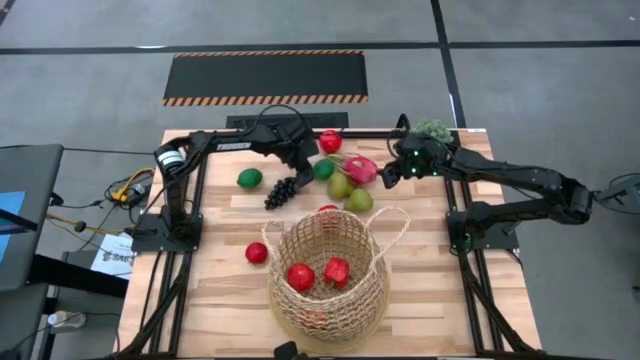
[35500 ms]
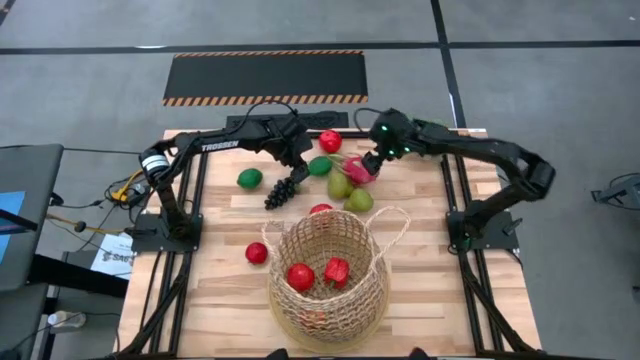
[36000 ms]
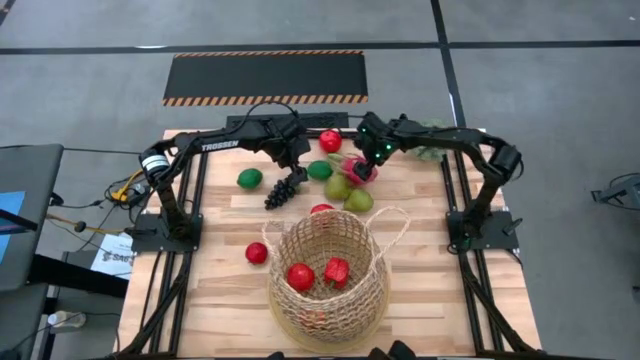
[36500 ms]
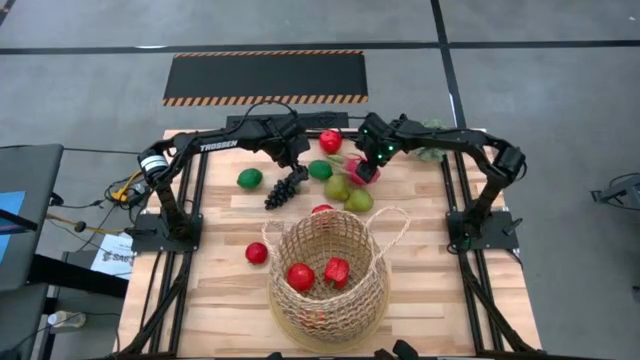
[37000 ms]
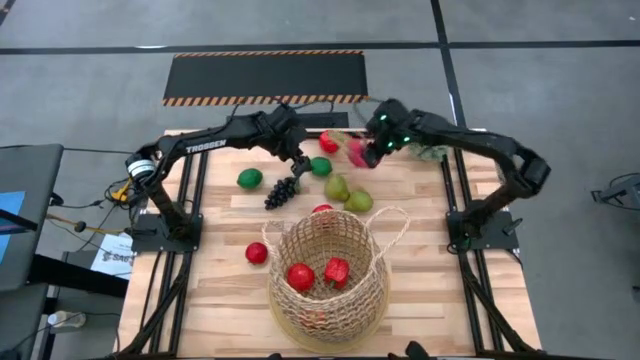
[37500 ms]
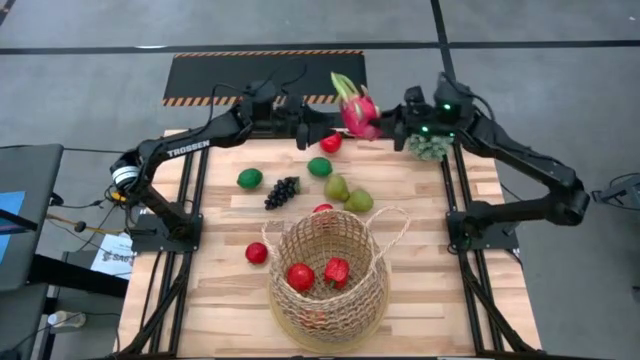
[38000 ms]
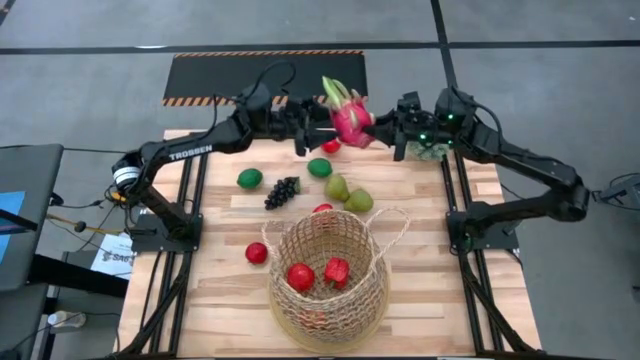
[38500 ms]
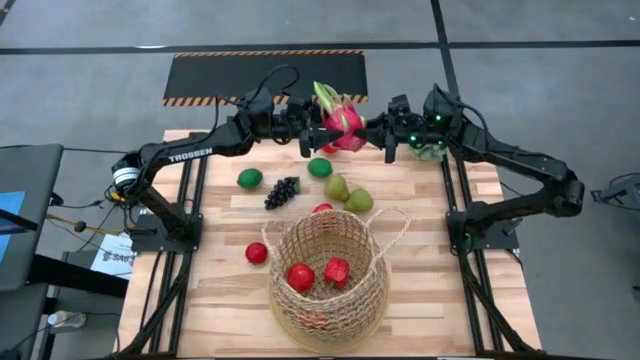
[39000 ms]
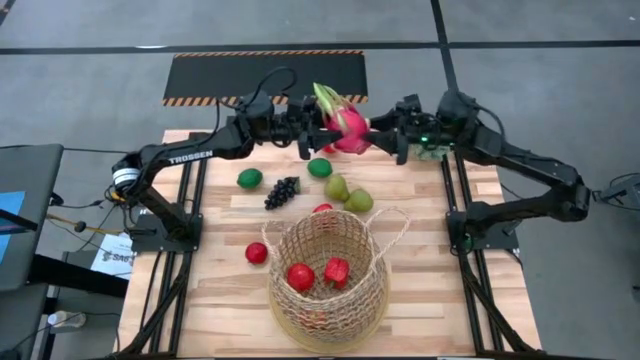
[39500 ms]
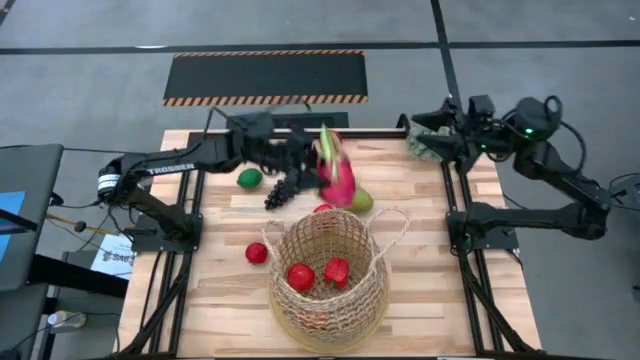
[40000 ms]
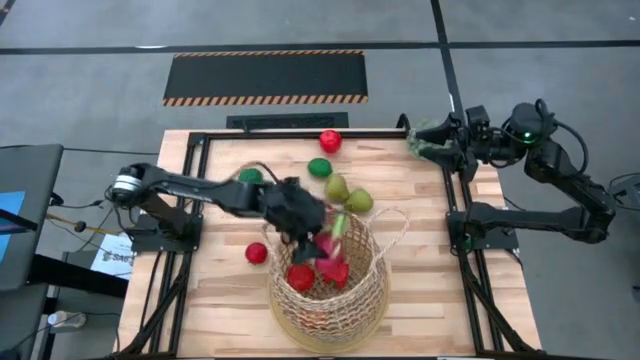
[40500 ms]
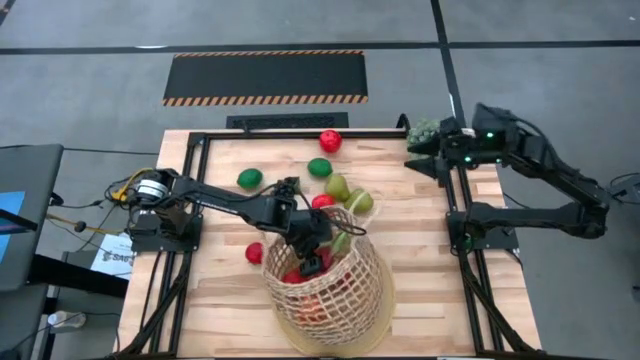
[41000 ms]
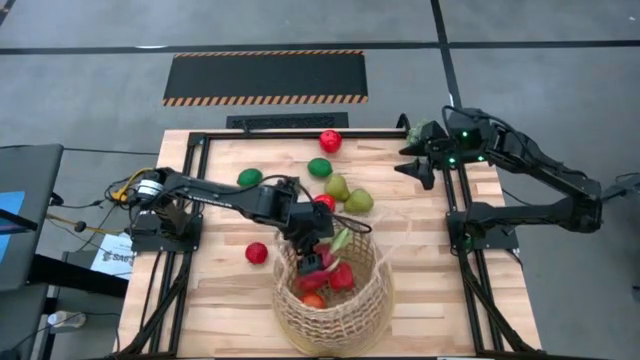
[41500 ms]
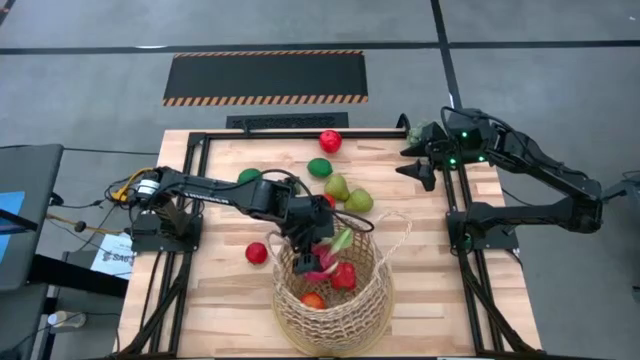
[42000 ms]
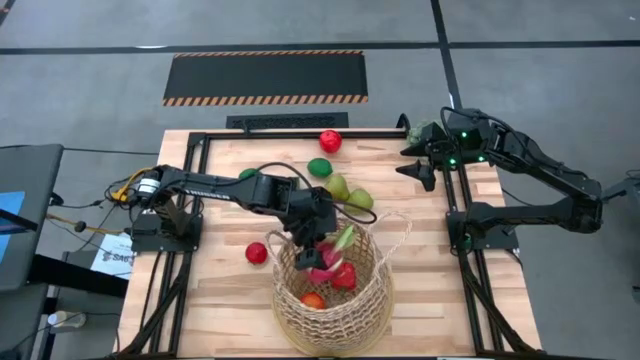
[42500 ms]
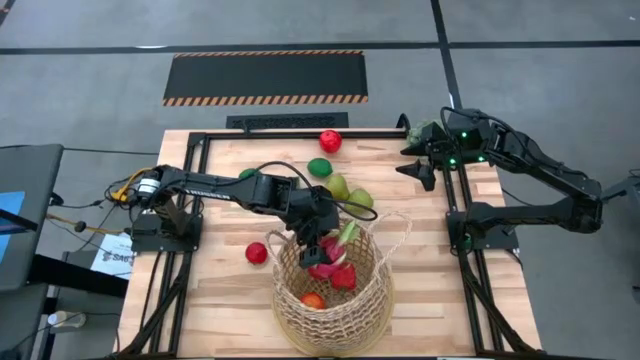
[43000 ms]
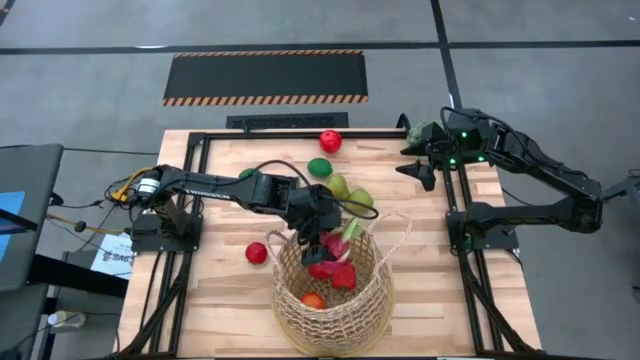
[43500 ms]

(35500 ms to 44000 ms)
Task: Build produce basket
Put the dragon fruit into the basket

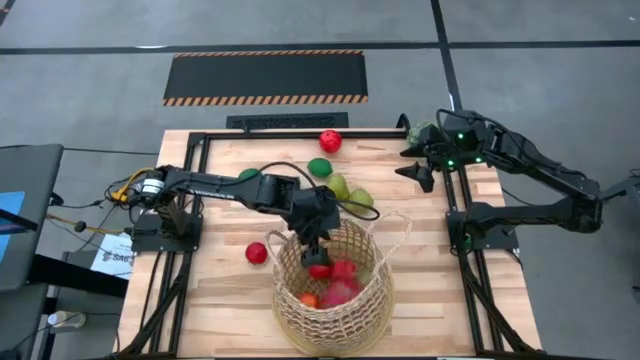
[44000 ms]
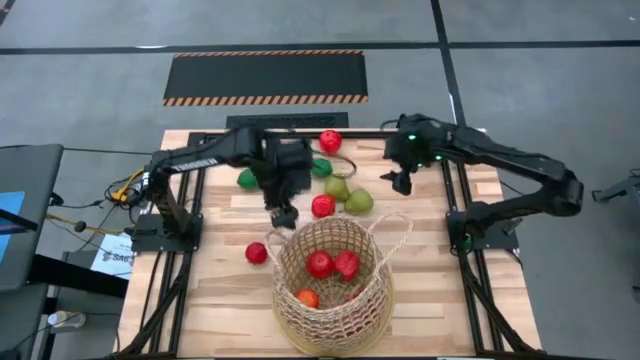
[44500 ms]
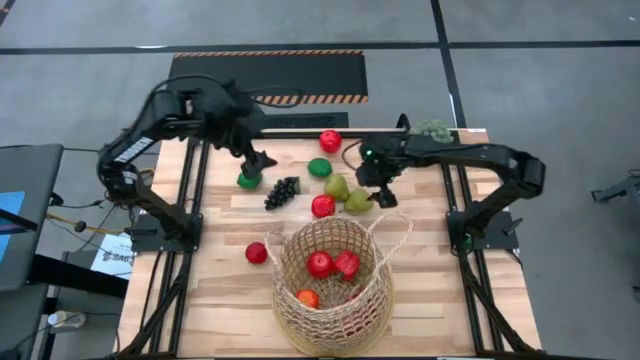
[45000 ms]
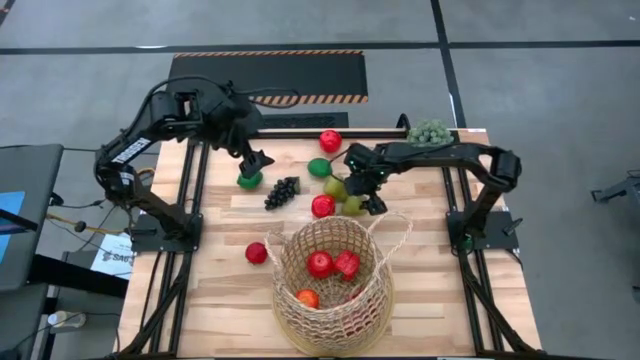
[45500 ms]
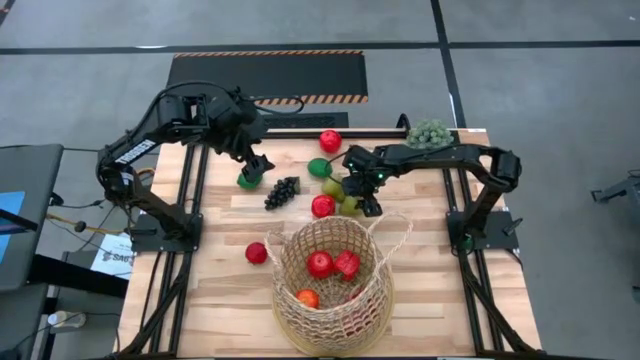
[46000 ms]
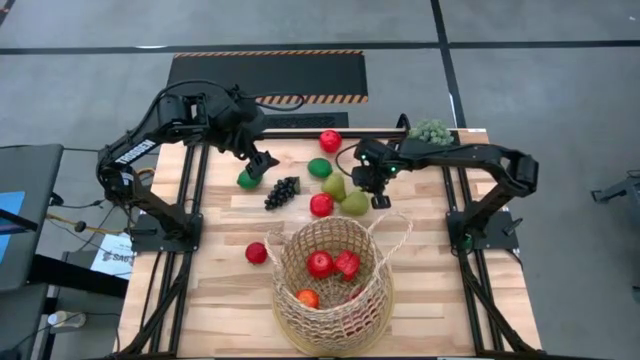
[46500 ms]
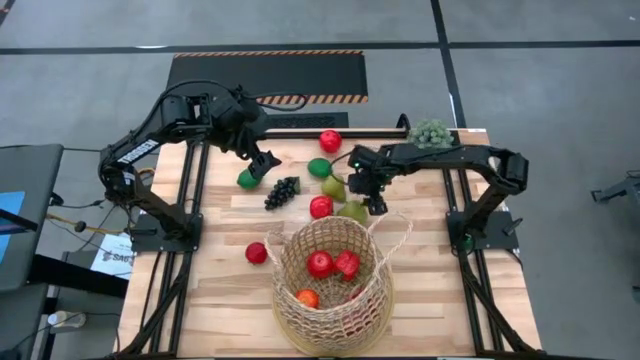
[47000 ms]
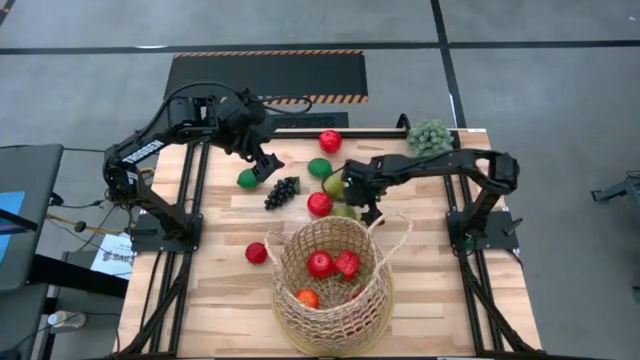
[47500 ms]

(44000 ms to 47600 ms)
Put the pear into the basket

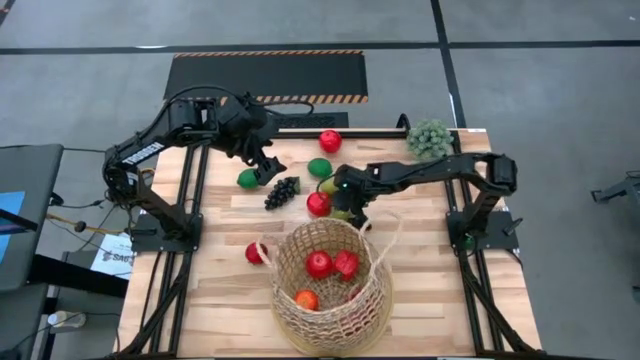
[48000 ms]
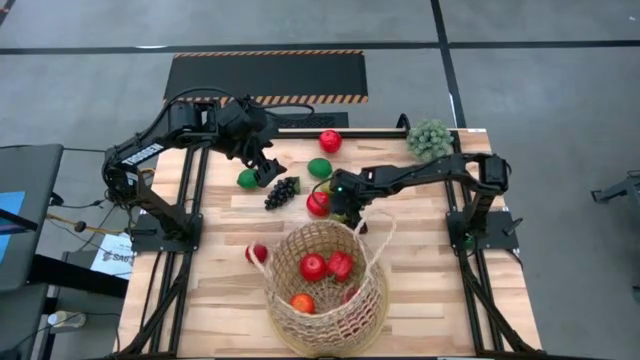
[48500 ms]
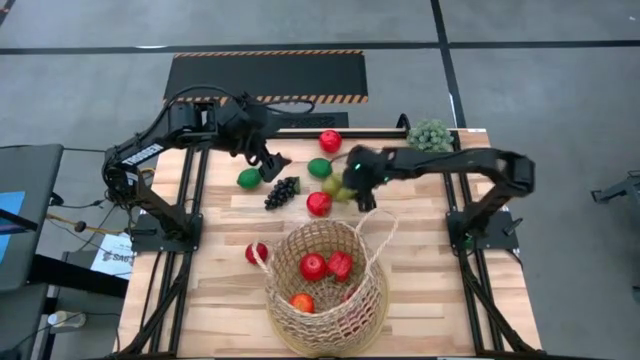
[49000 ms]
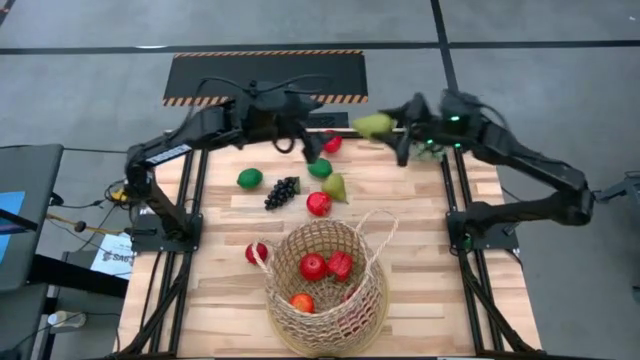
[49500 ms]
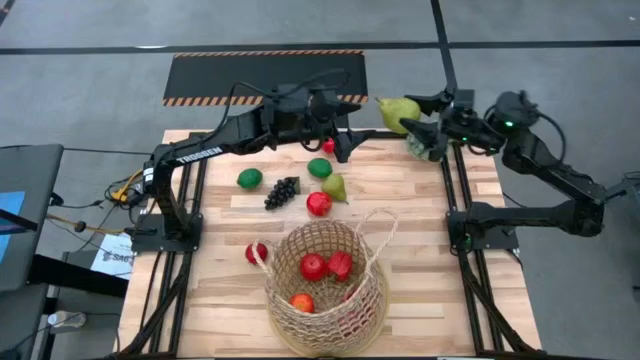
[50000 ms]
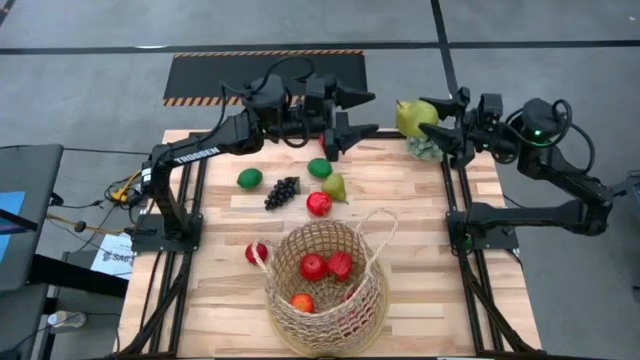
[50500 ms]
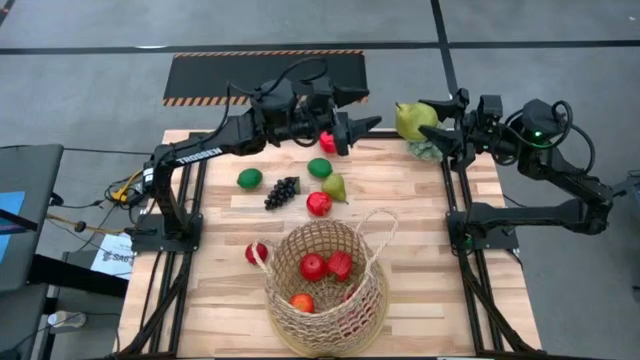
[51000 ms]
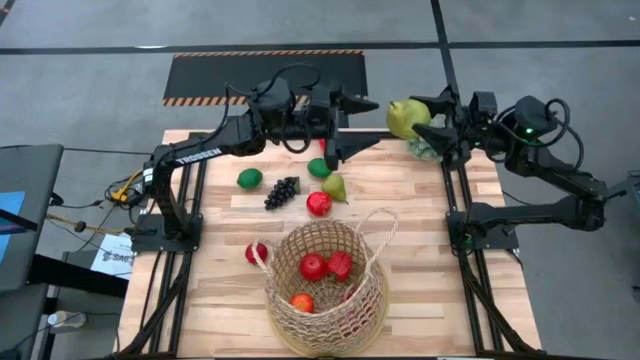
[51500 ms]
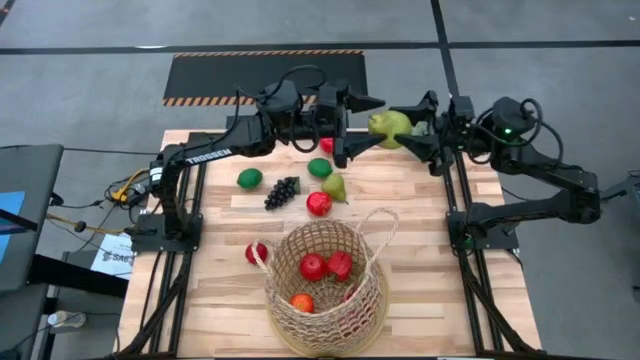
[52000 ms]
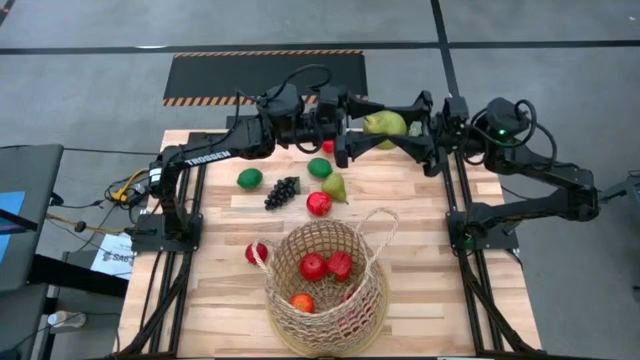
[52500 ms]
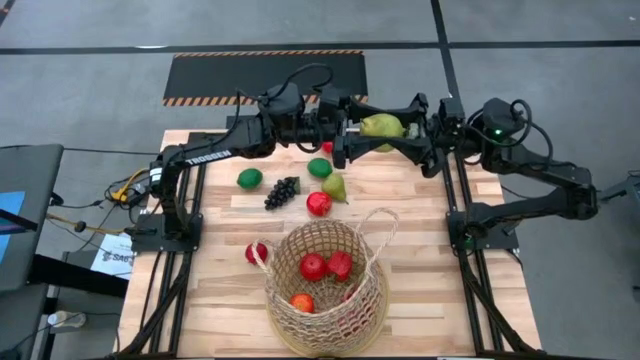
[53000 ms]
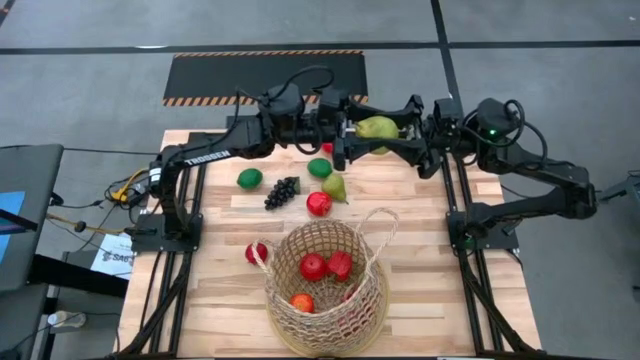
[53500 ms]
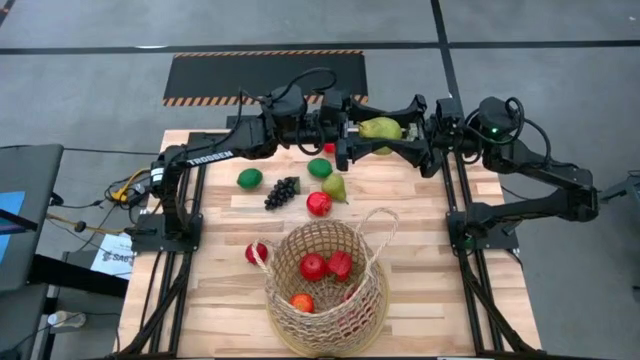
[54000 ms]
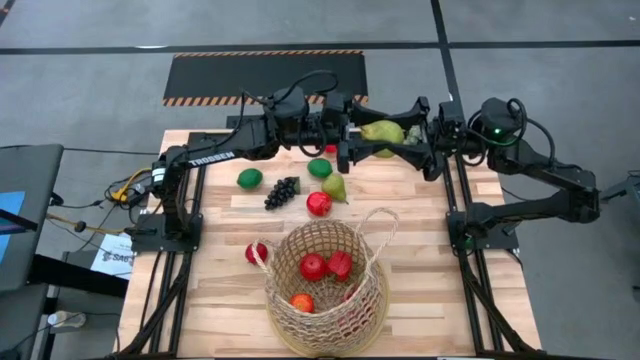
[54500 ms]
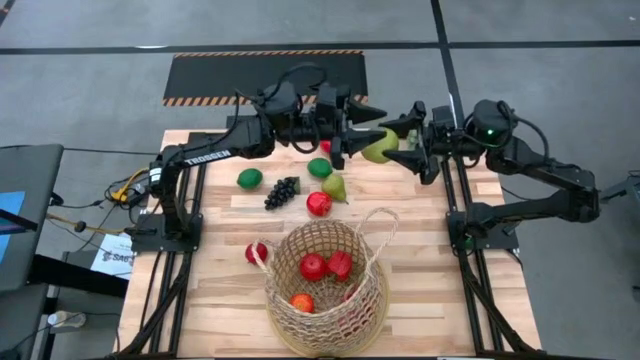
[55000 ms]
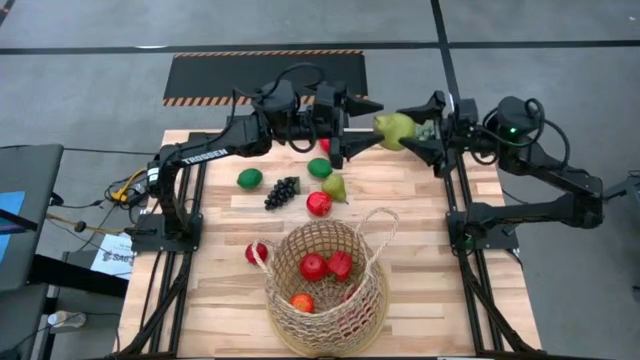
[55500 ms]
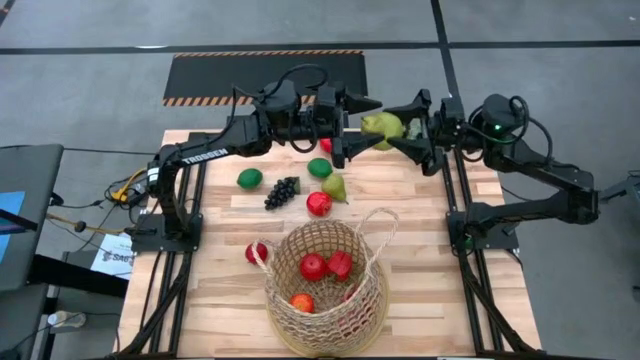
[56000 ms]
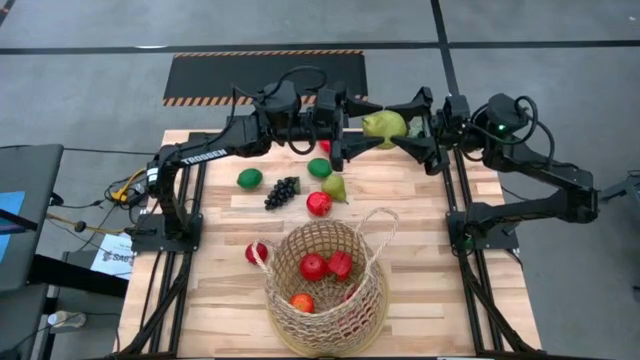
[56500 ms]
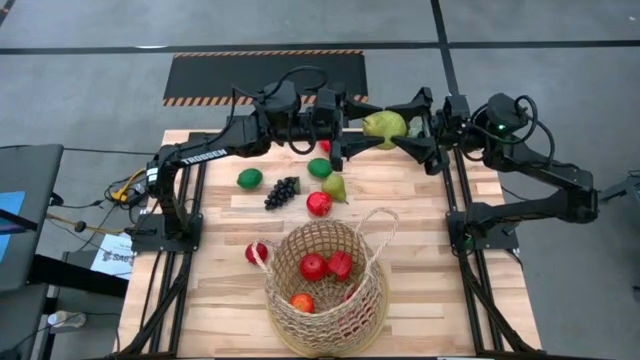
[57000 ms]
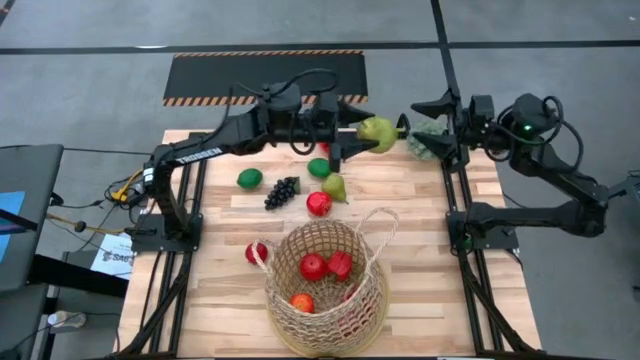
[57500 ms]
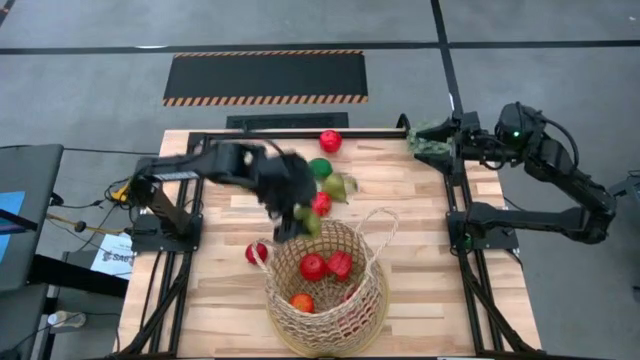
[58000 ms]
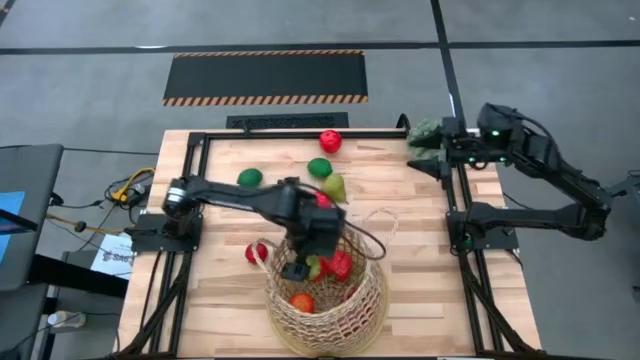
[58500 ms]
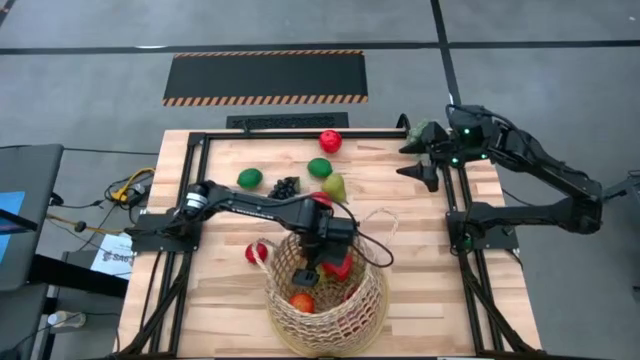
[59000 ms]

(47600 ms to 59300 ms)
Put the pear into the basket
